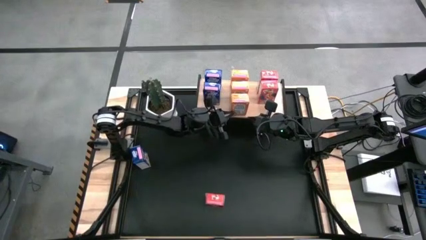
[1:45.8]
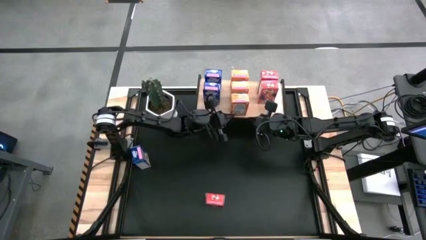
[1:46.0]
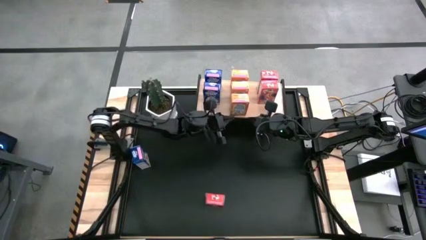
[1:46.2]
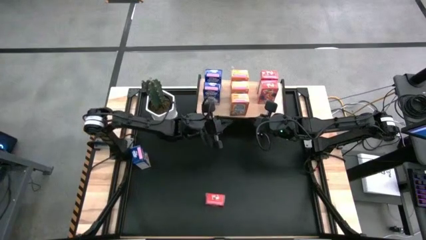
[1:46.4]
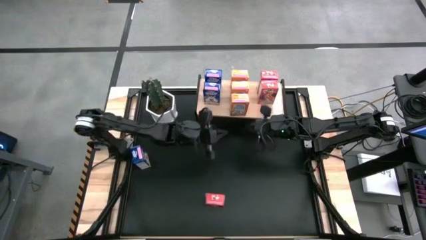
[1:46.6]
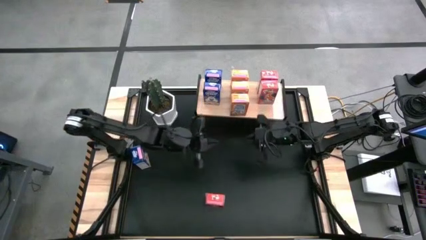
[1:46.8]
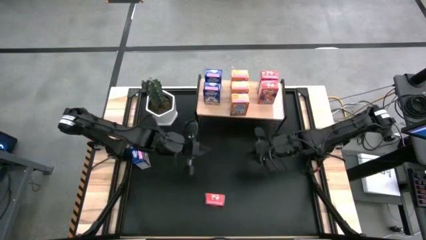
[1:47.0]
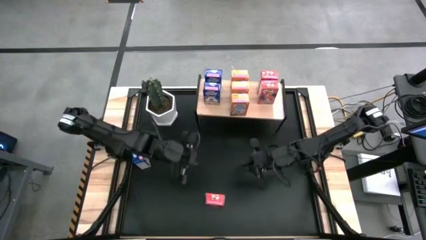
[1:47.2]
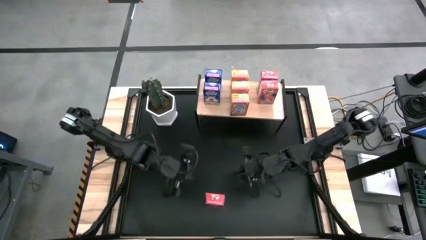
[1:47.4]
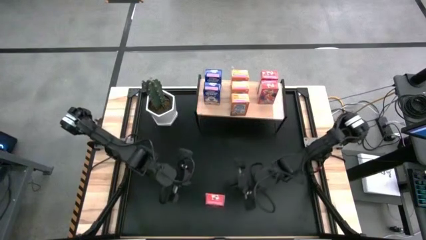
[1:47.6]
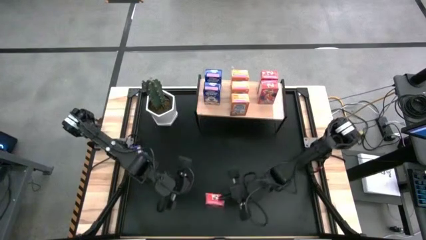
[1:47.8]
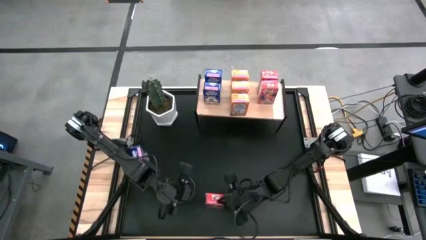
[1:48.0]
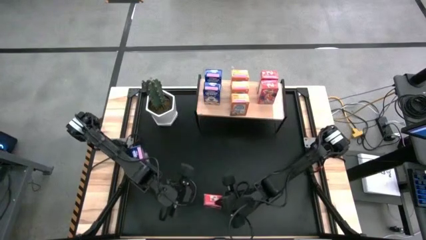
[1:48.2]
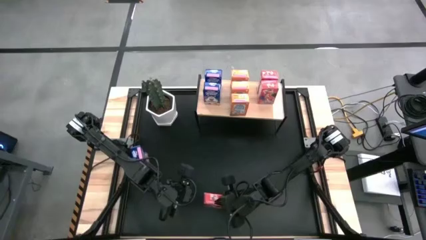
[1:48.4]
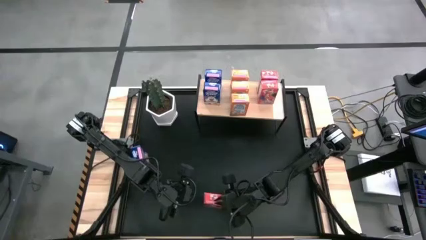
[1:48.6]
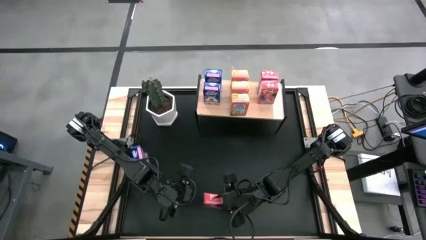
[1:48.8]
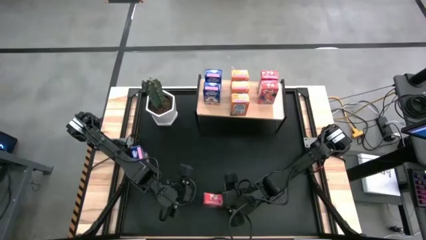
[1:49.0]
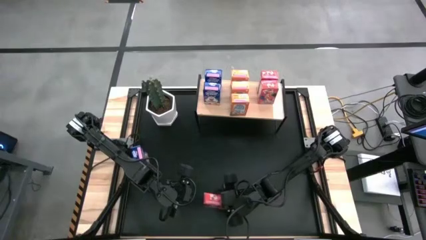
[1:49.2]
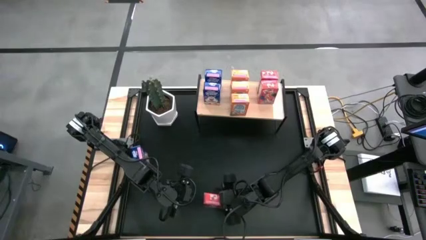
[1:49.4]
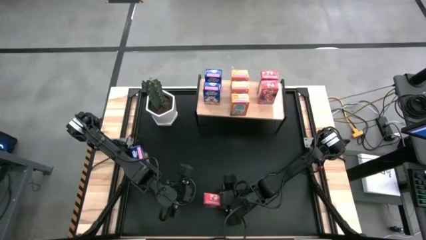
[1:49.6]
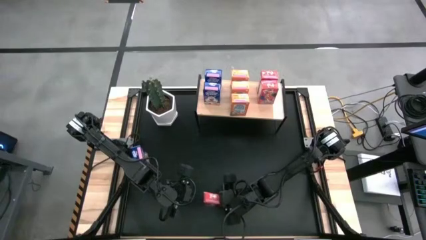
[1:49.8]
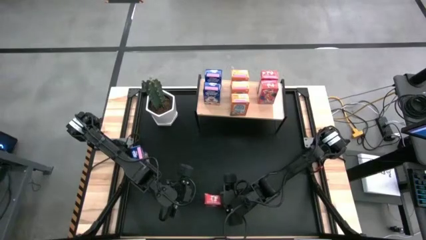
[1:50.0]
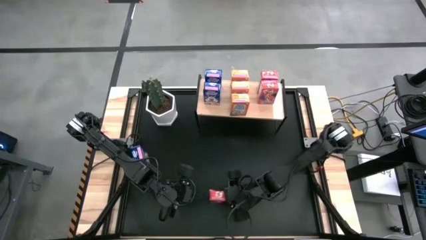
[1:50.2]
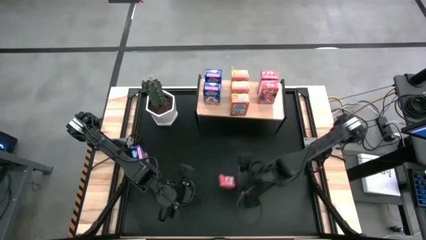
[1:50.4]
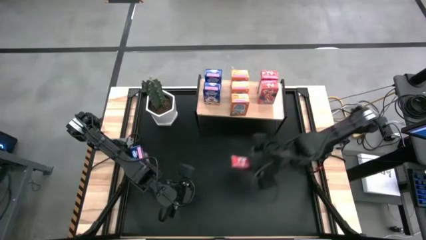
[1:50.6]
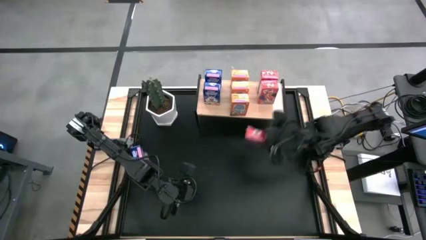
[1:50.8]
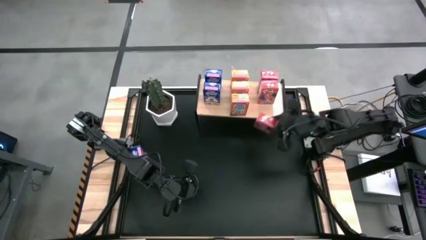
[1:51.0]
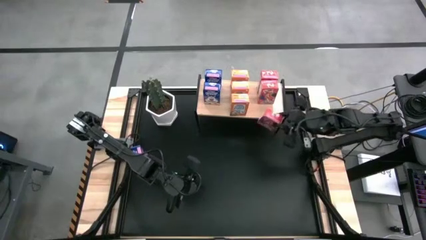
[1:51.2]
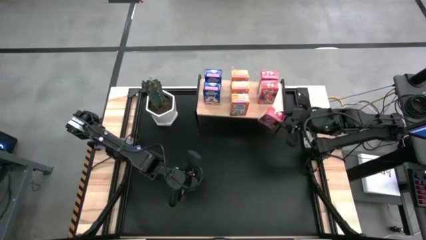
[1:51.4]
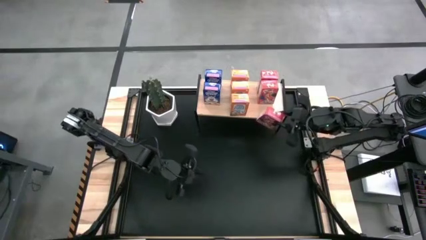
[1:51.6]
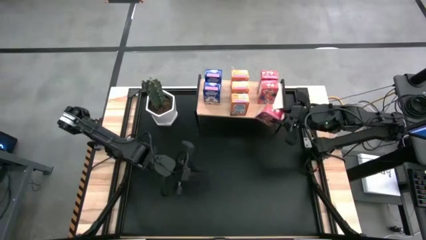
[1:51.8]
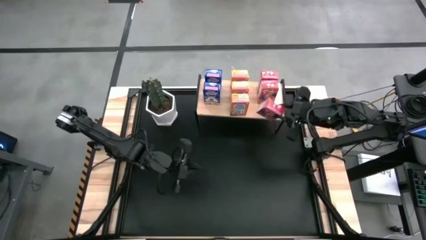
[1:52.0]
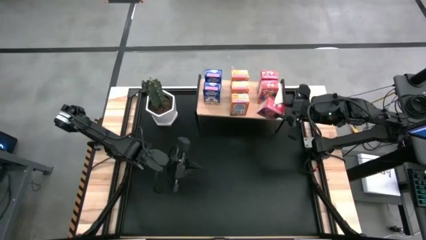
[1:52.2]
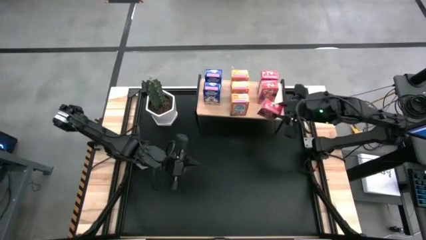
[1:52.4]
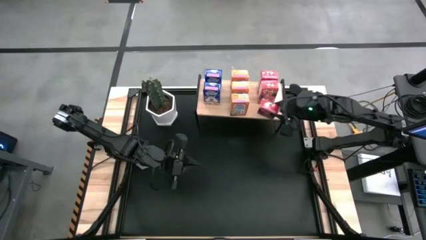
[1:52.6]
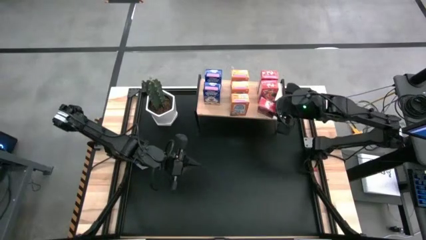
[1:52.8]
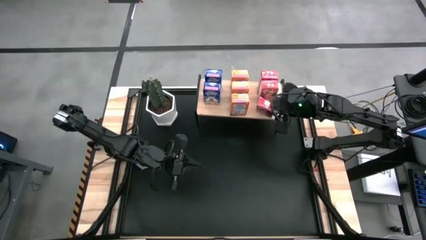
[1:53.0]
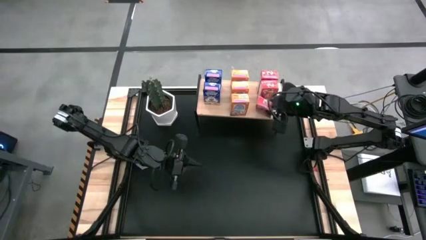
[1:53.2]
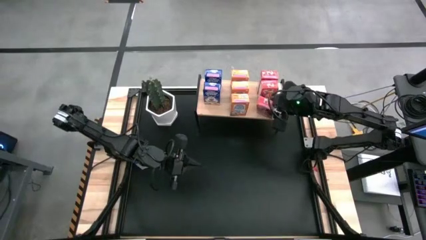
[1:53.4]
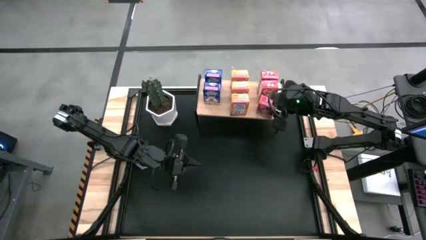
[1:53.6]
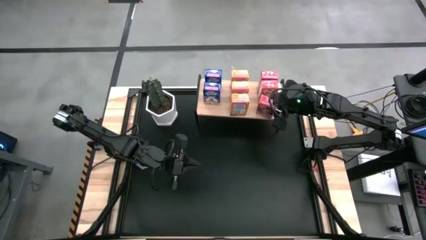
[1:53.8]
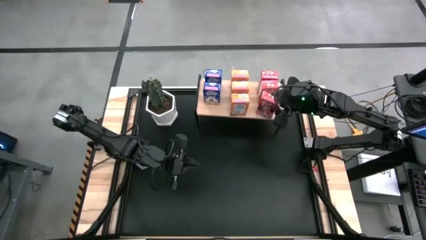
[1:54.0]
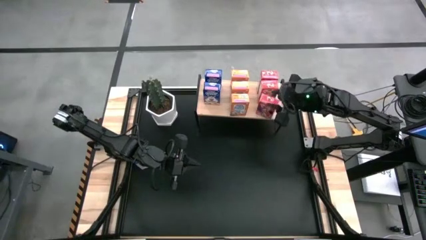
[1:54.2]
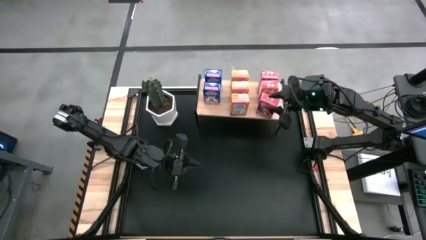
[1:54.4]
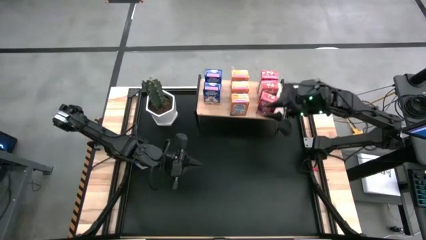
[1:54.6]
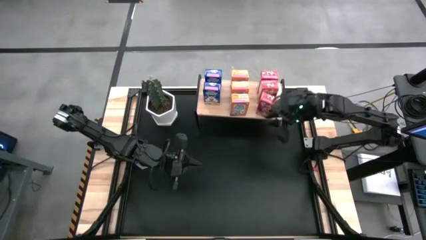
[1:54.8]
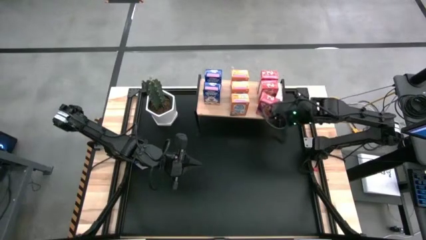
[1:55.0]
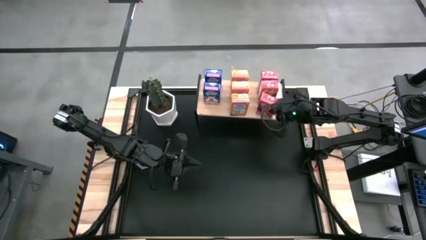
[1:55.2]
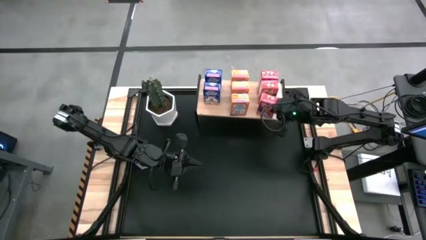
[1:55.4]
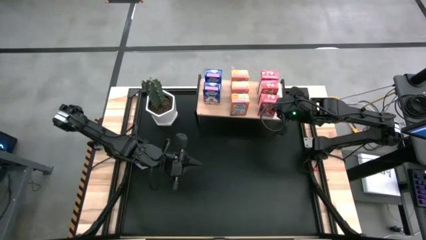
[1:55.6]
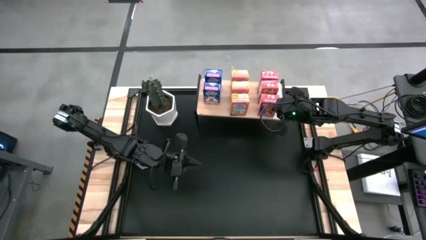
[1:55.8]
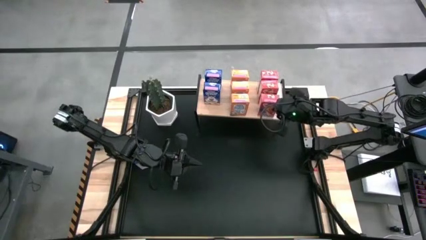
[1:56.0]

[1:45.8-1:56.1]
Task: Stack cereal on shelf
Put the red cereal box on the shelf

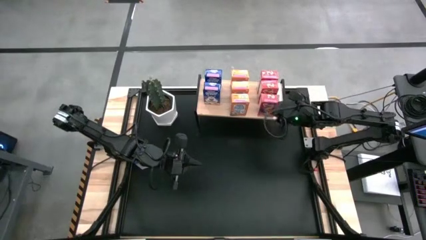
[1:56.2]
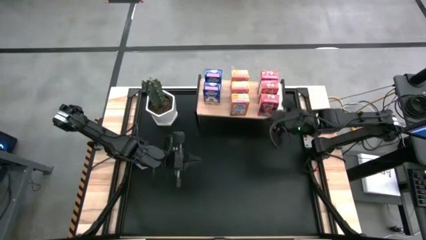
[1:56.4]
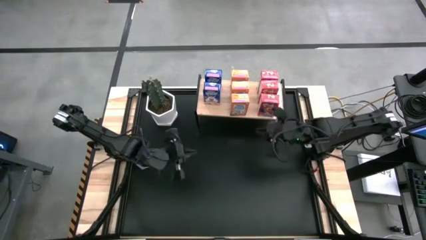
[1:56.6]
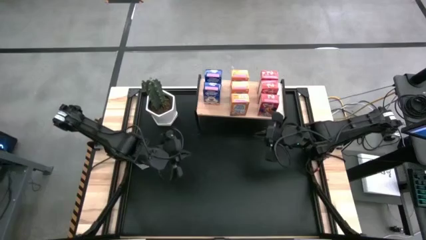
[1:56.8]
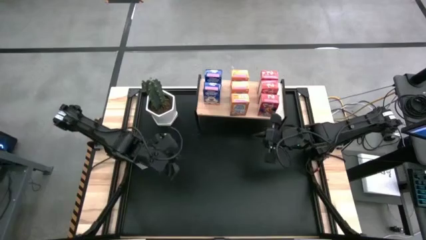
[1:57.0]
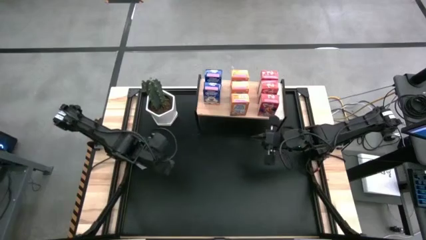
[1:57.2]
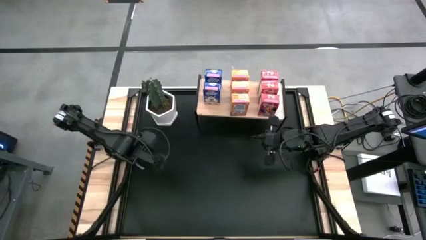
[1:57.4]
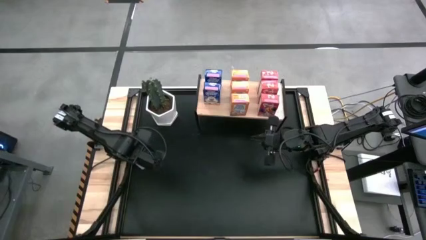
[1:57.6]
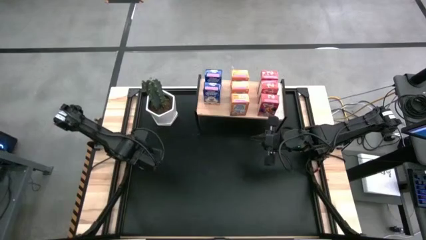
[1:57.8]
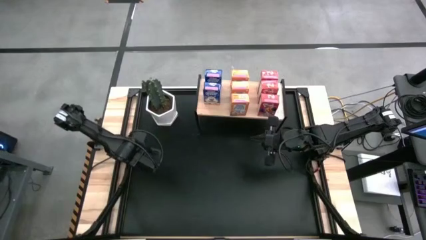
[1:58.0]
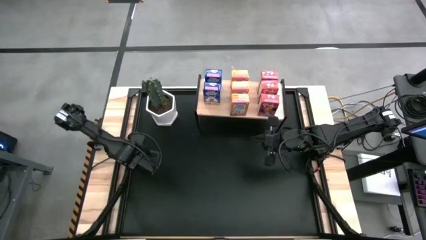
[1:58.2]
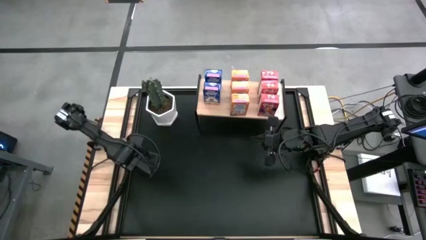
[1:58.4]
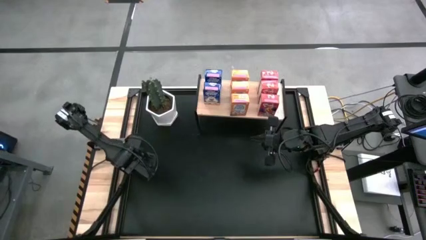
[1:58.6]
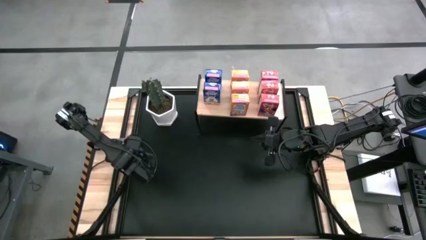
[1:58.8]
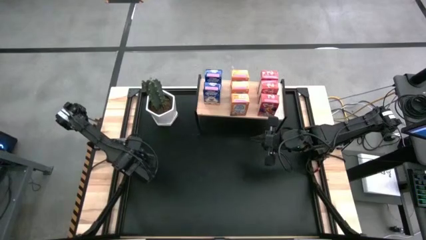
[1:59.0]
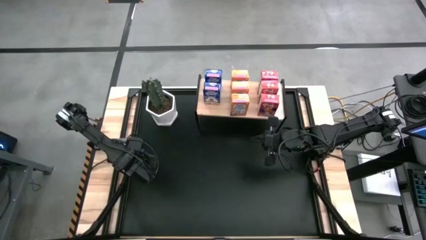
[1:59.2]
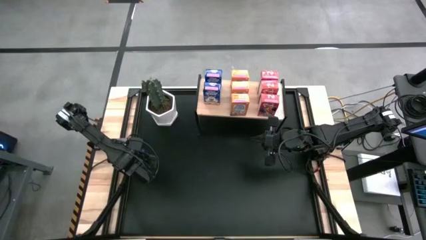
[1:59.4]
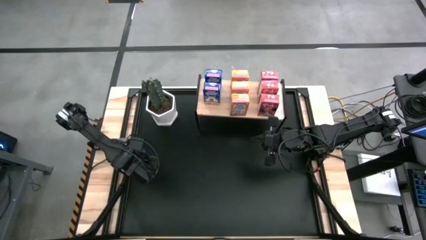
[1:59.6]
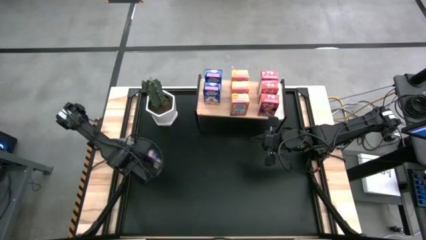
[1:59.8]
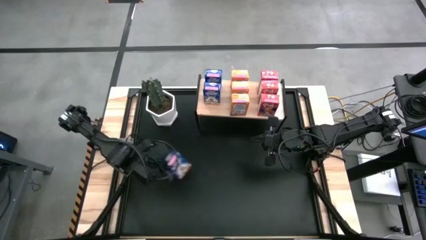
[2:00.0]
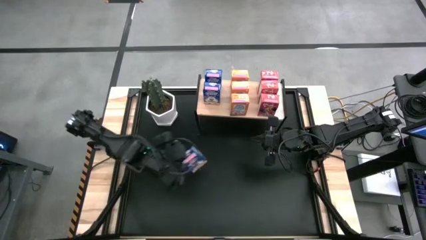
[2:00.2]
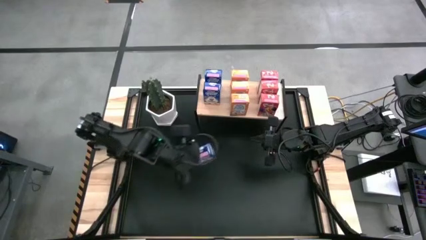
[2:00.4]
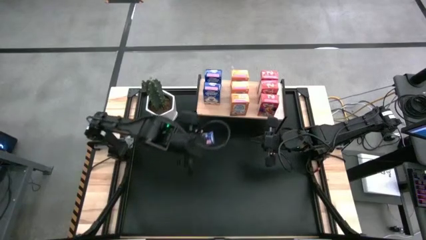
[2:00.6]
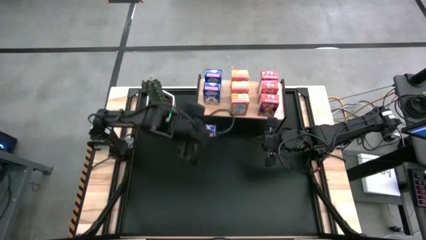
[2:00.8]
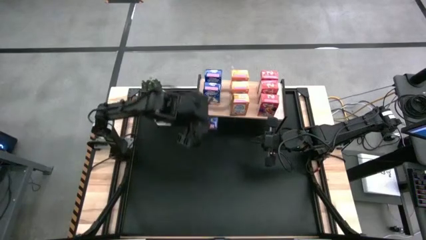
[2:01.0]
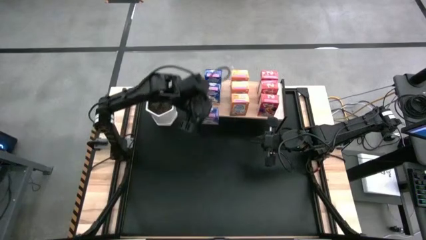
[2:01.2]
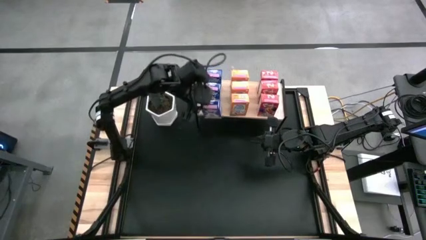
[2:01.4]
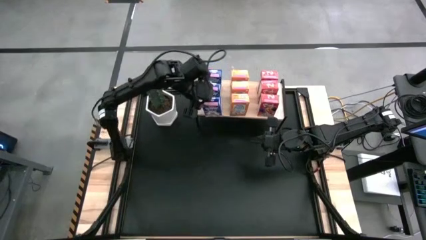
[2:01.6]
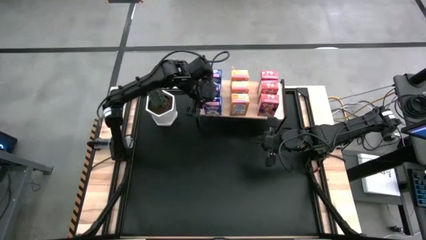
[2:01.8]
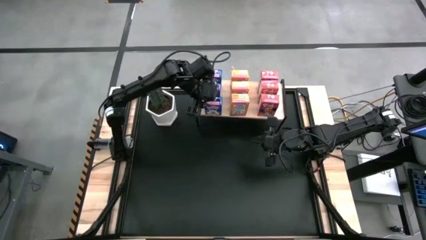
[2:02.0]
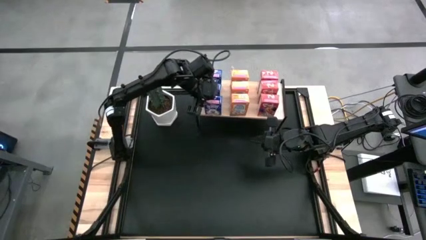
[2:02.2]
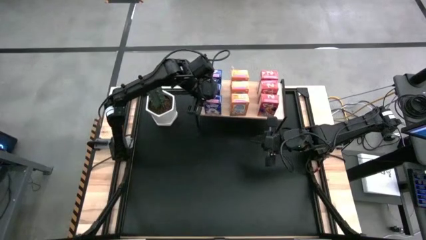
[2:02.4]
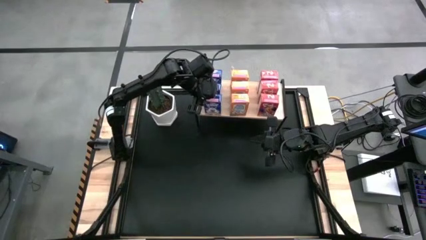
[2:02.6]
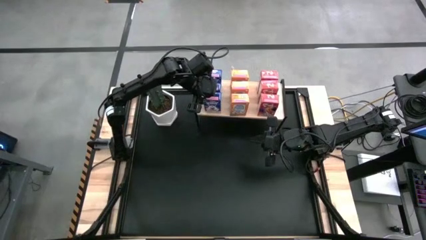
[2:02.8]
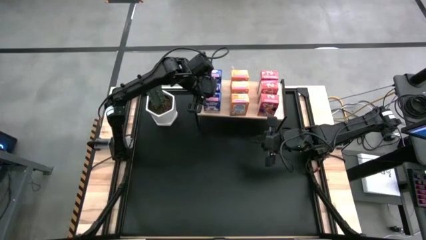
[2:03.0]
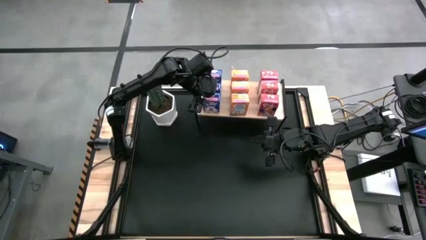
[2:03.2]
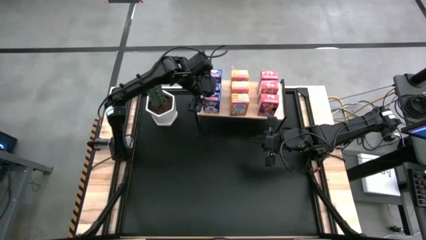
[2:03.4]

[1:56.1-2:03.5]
Put the blue cereal box on the shelf
